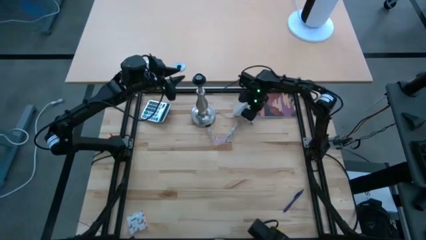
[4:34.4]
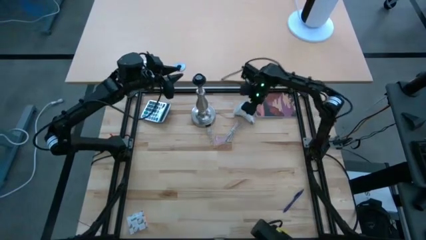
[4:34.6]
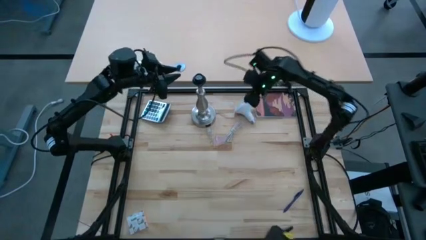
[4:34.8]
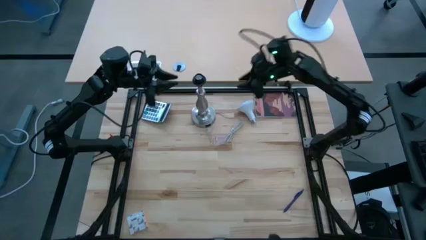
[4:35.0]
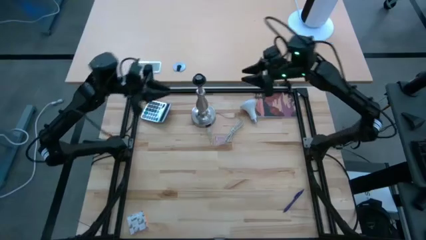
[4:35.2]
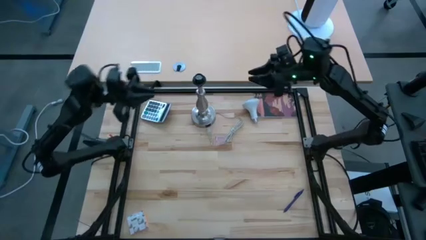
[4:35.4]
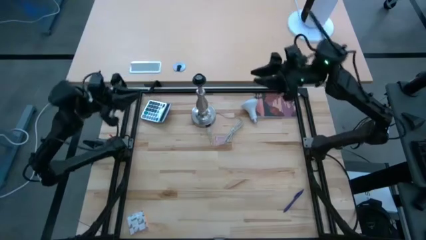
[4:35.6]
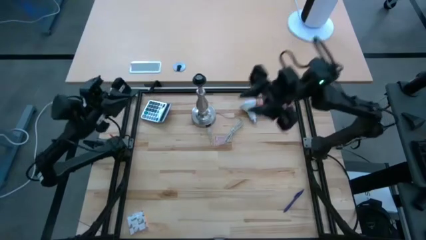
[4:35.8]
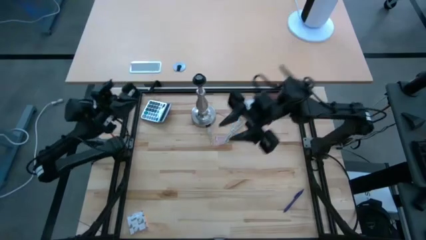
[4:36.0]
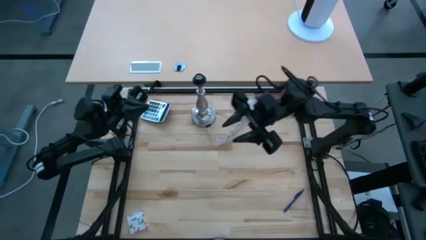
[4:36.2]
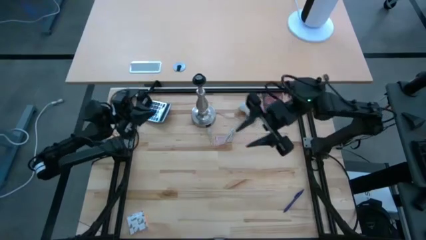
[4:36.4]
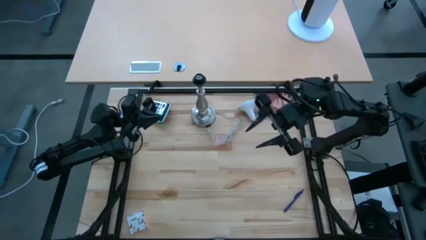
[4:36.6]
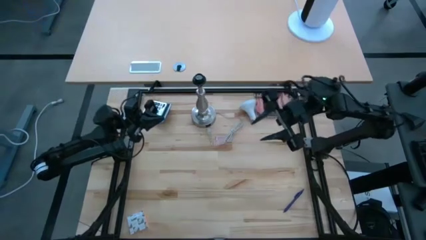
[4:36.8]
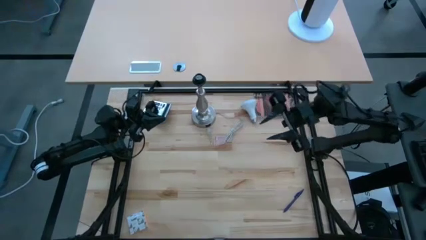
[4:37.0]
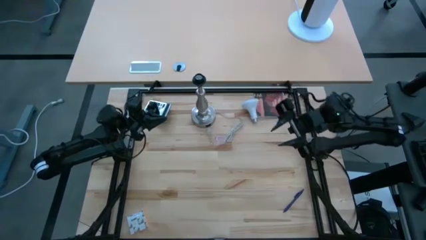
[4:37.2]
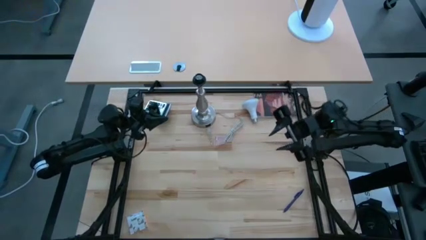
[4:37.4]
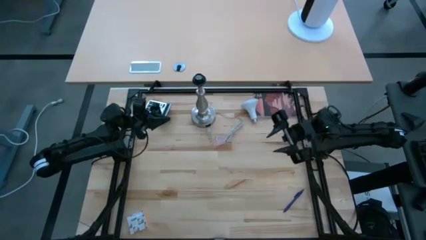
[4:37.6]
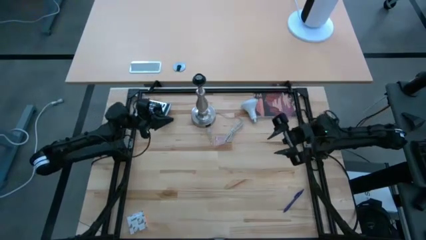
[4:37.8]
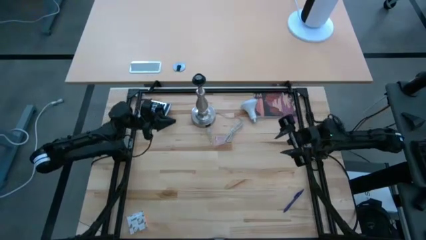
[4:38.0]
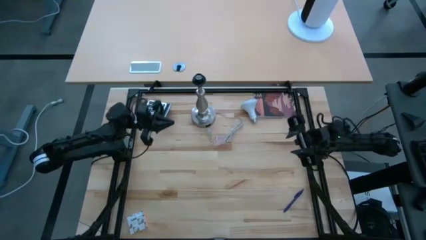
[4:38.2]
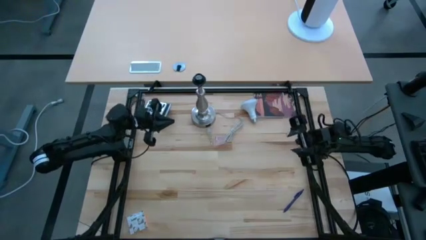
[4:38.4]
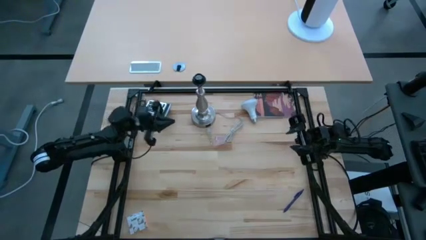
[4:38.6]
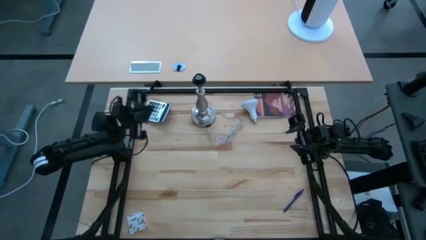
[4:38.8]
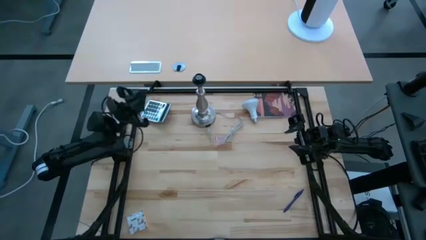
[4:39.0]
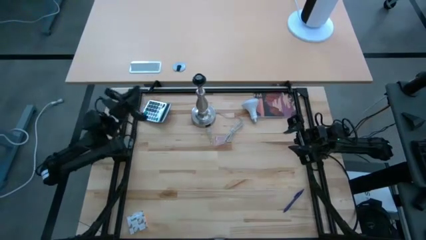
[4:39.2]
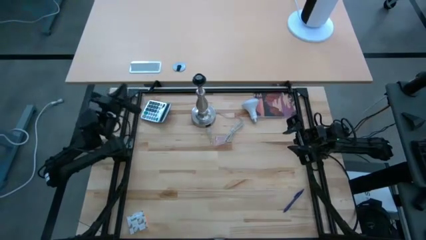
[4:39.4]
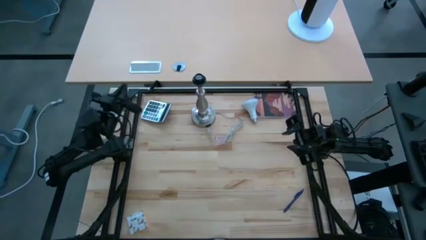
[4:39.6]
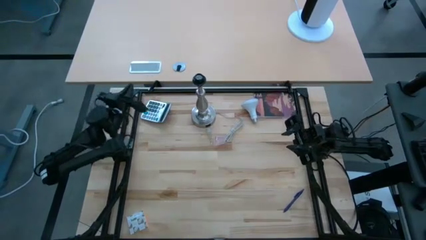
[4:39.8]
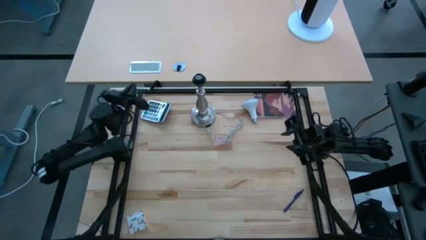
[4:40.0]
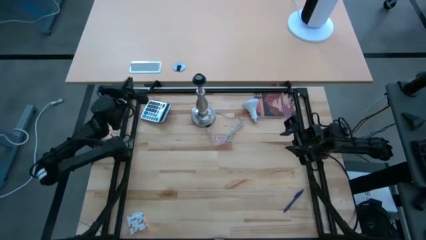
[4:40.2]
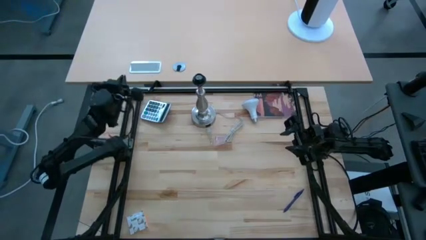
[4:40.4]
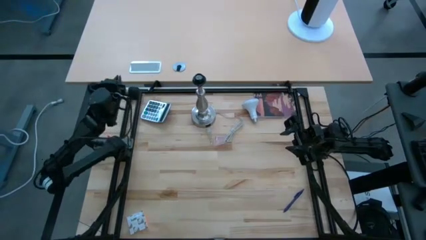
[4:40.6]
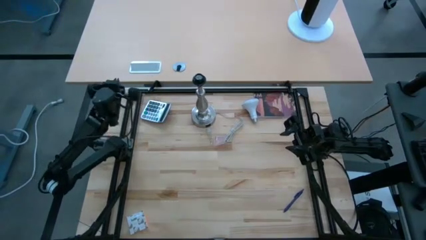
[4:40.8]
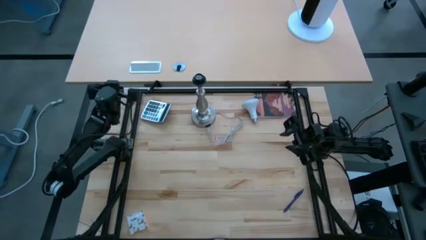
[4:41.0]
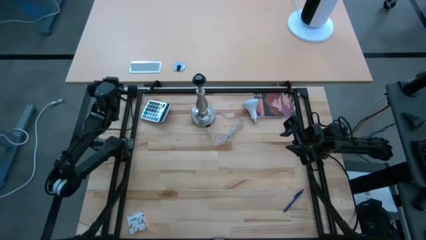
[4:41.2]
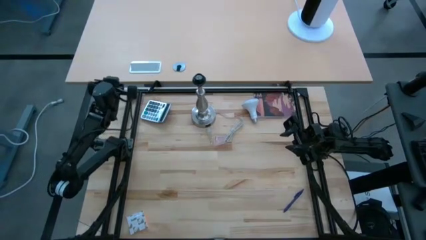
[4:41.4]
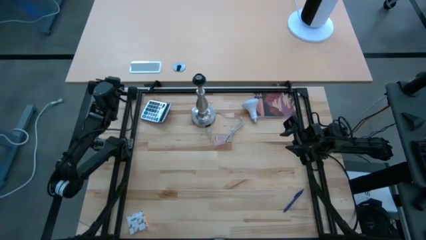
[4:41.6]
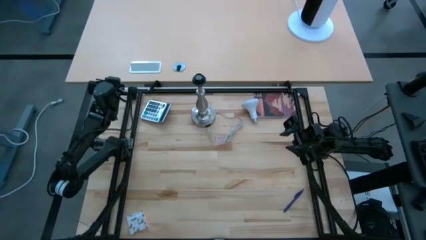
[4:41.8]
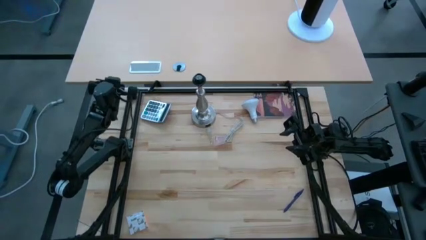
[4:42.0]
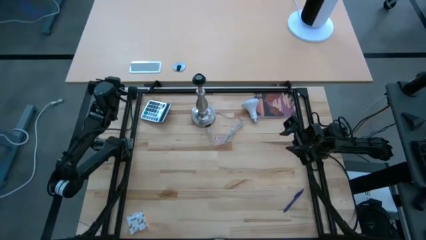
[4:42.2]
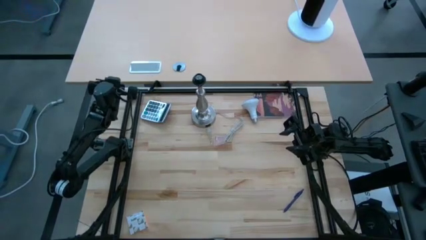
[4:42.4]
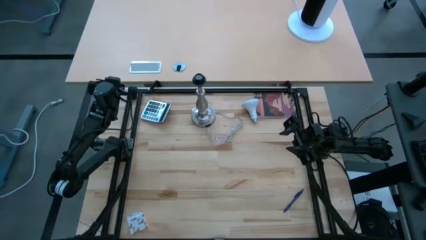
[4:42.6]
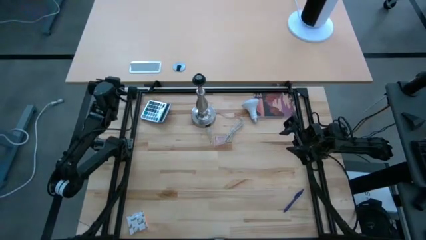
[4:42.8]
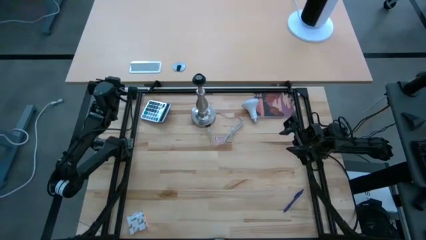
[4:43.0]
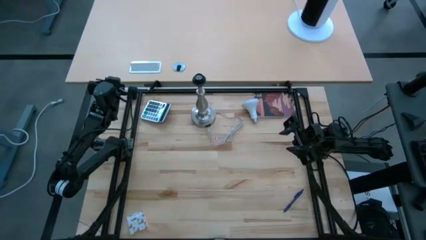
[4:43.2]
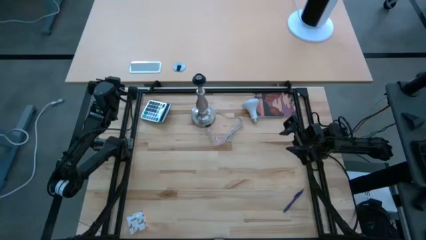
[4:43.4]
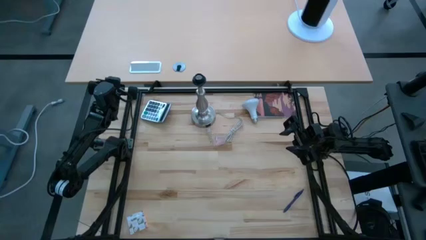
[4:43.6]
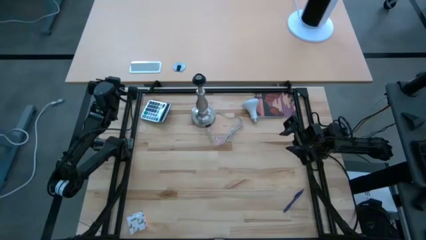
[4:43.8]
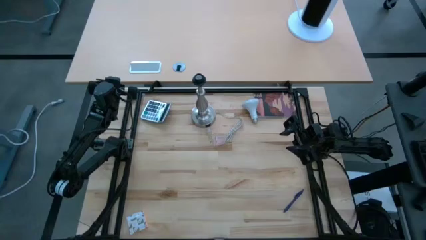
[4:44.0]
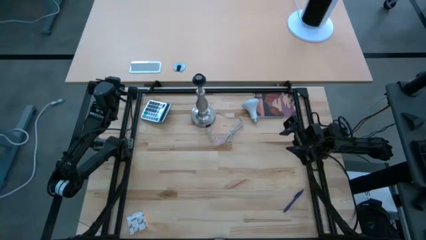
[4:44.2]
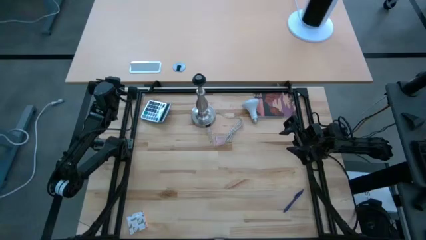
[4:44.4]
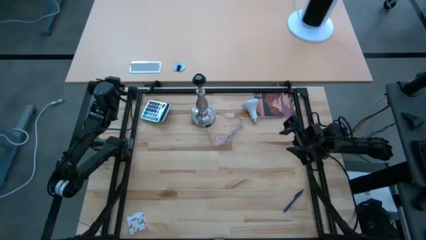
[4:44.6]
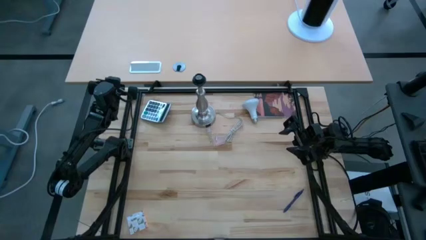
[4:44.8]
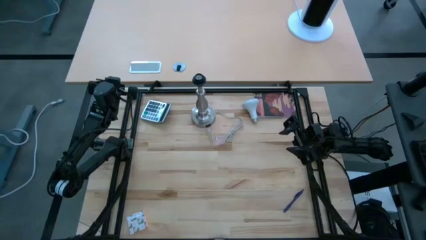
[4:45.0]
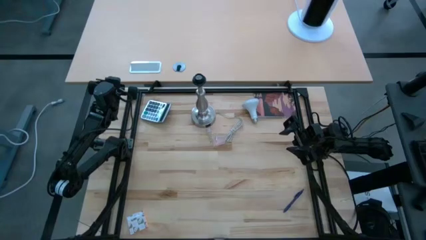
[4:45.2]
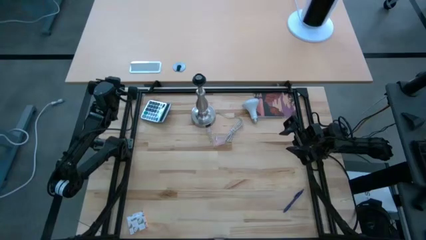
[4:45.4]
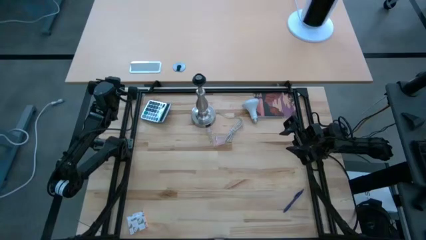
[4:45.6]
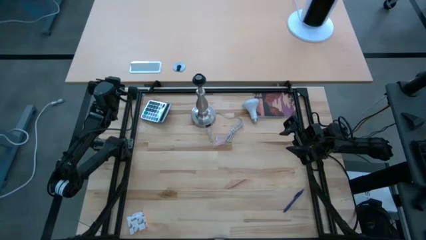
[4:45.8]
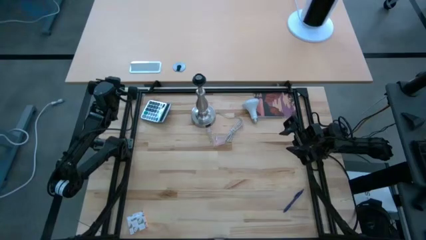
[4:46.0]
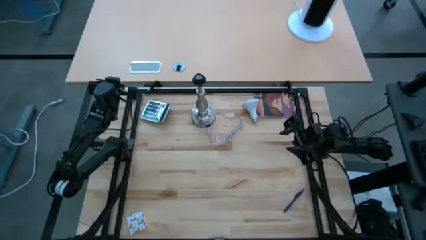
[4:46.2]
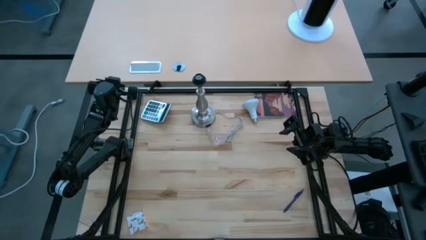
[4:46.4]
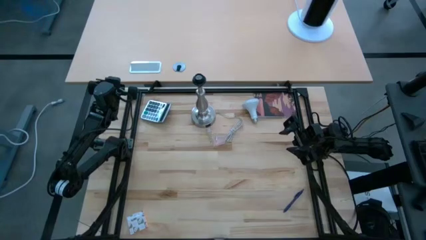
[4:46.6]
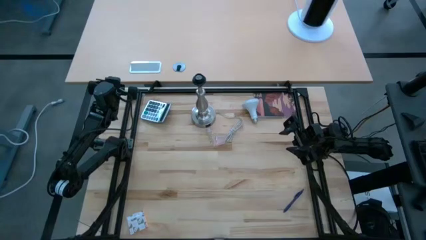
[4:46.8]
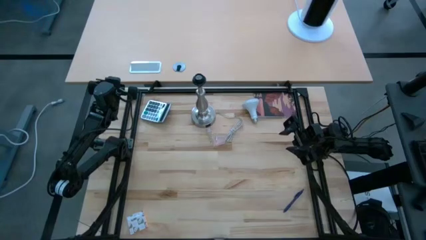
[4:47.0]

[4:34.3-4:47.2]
Task: Screw lightbulb
Return to Home Position

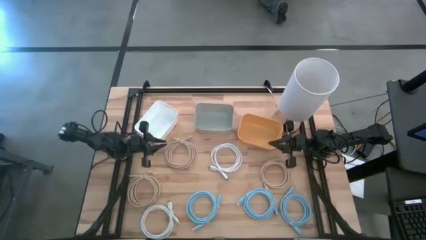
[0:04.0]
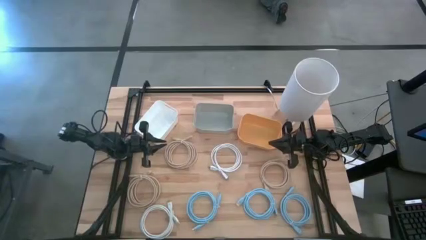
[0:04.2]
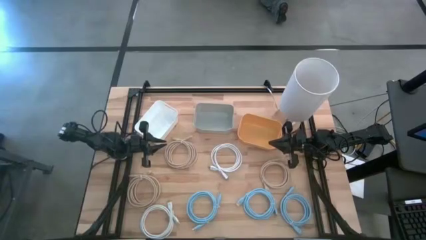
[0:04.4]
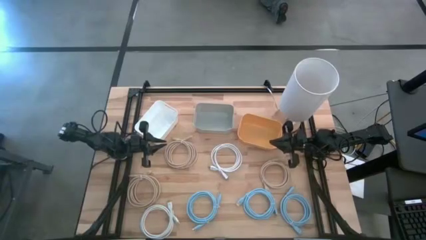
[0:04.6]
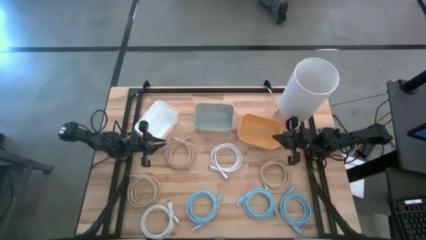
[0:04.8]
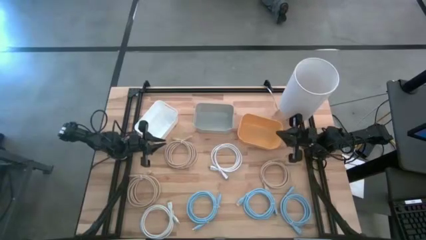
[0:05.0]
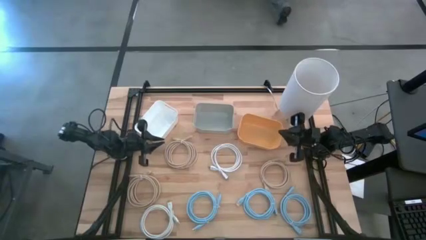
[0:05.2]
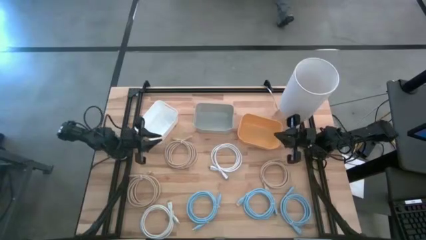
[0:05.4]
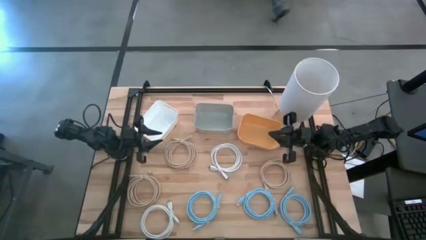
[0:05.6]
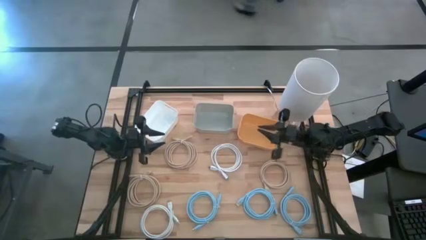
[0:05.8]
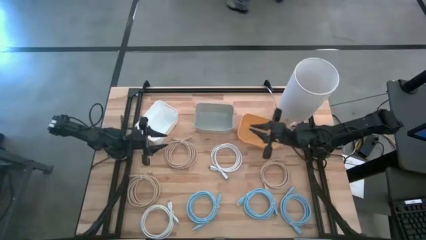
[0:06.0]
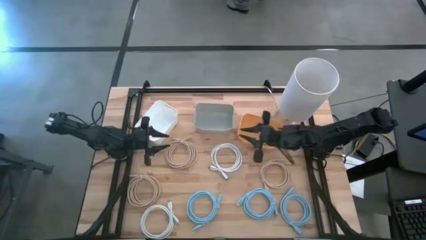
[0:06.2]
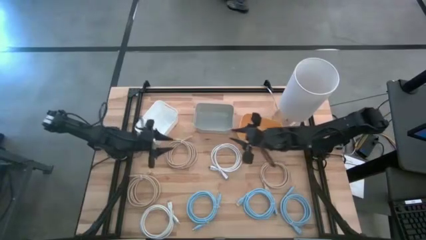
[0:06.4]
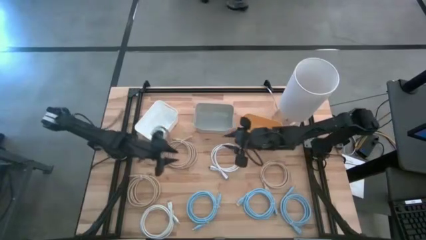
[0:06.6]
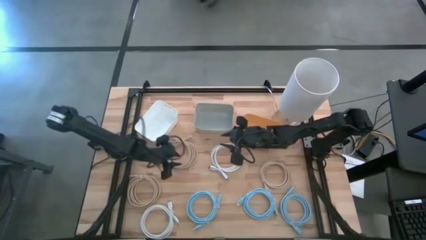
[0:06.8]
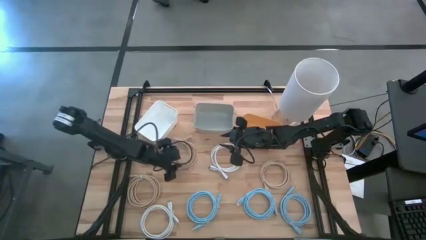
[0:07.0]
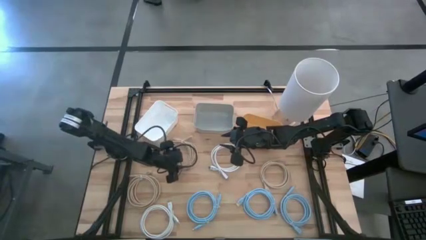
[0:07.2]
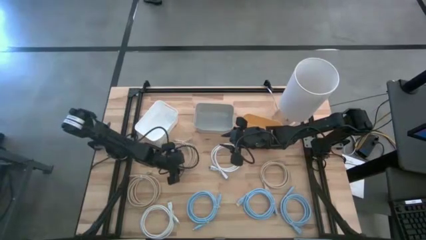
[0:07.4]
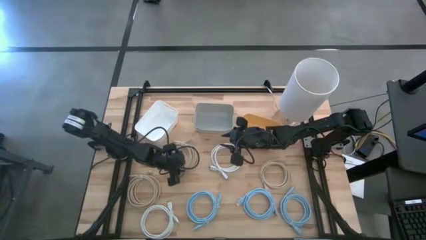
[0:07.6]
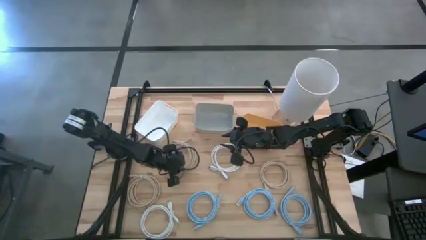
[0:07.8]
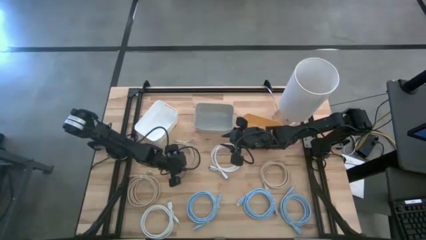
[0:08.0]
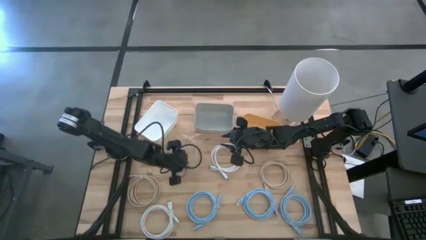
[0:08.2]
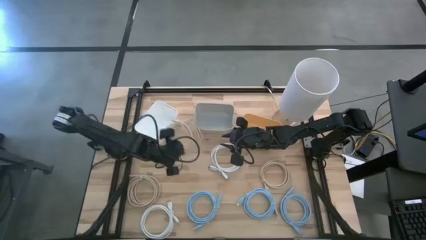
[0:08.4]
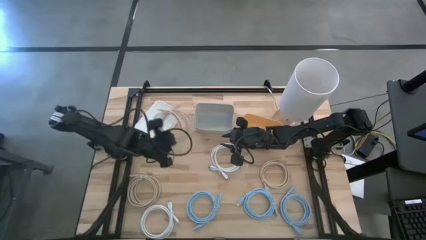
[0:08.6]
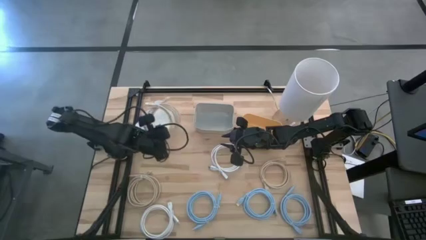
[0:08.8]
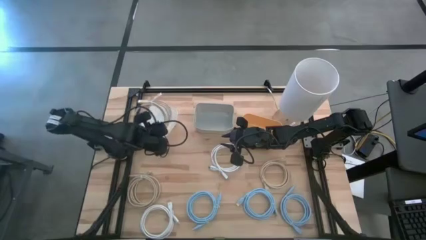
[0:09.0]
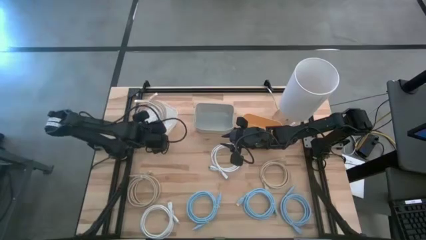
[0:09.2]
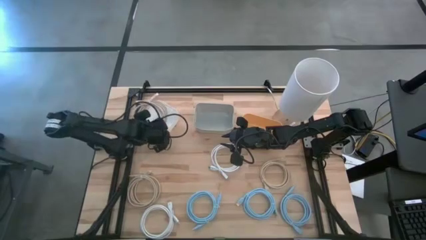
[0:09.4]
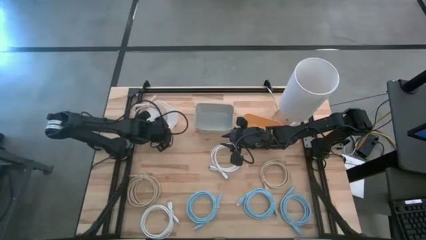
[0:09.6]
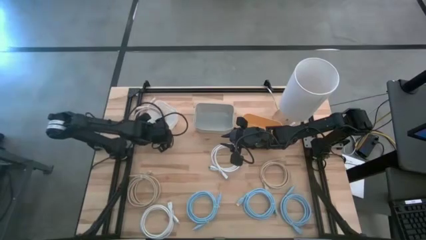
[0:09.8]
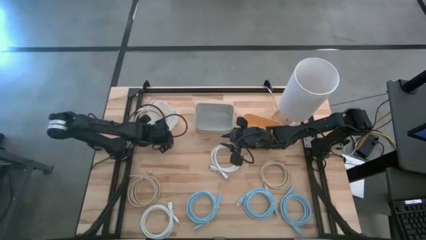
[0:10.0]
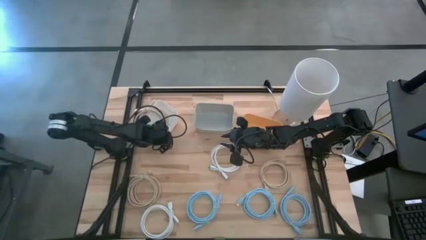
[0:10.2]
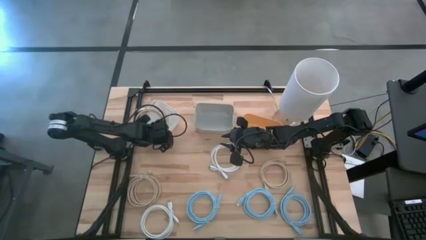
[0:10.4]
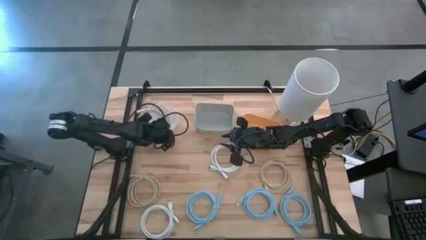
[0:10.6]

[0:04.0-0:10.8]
Task: Sort HDMI cables
Put the middle brown HDMI cable into the white bin
